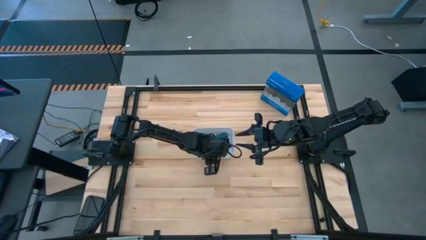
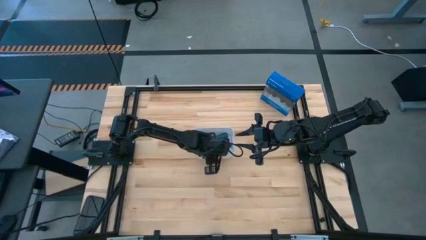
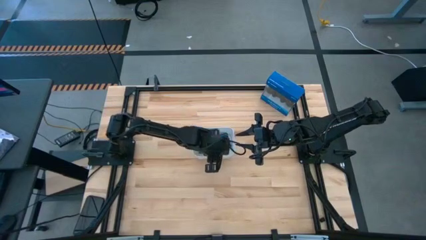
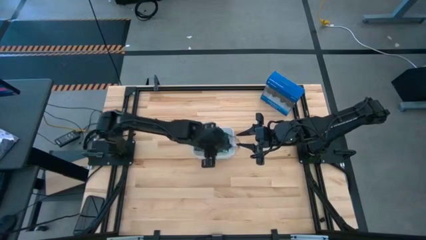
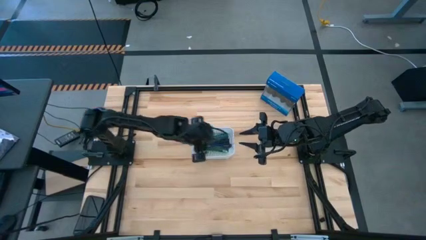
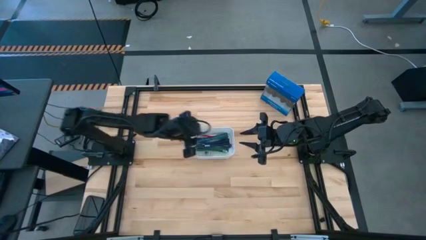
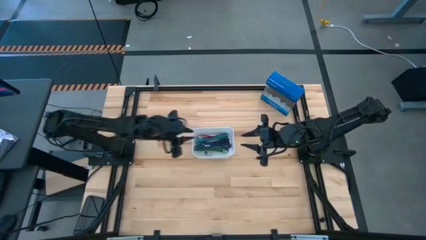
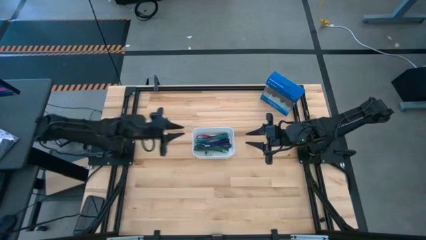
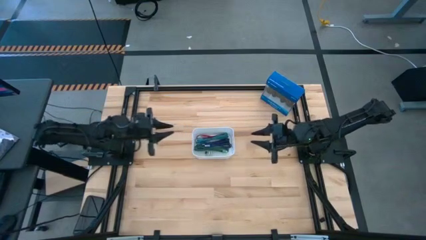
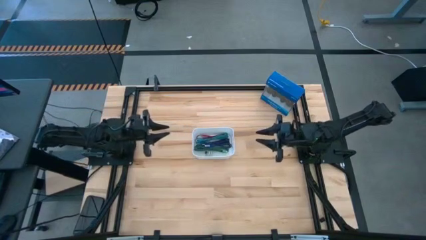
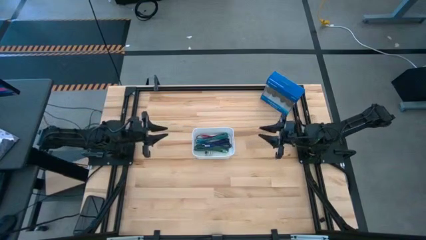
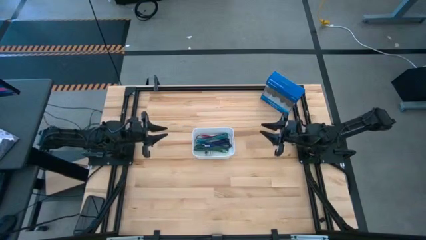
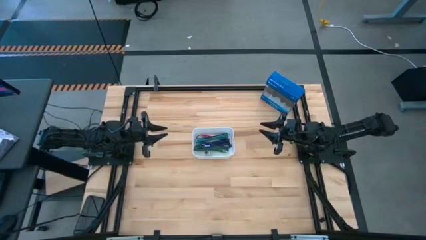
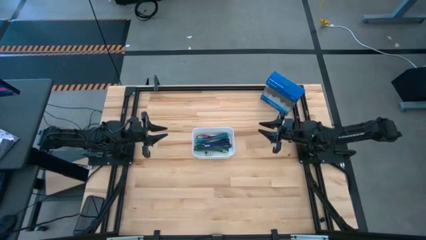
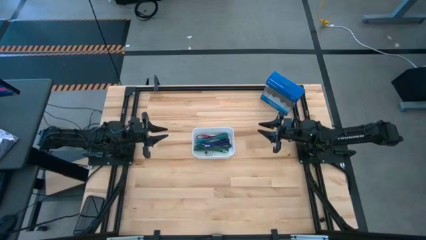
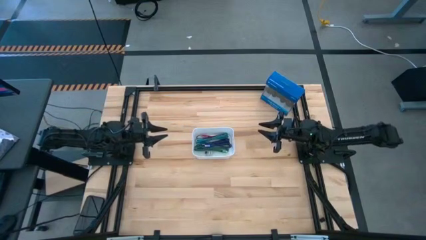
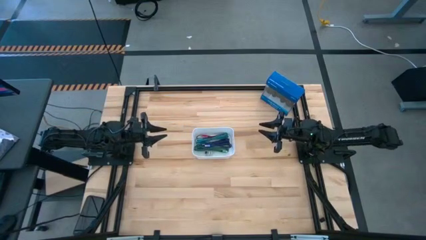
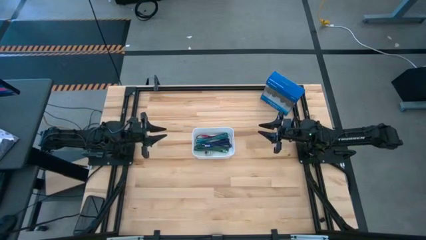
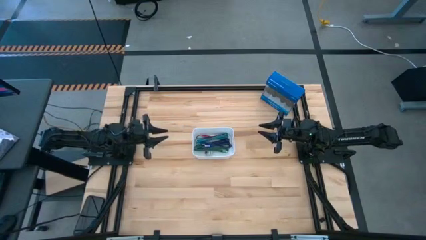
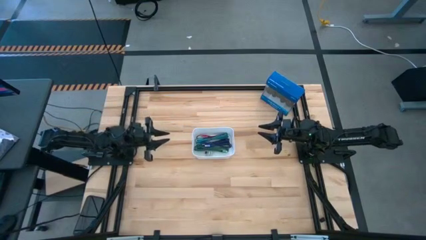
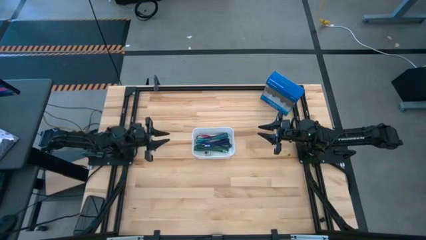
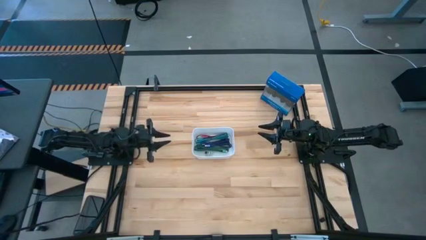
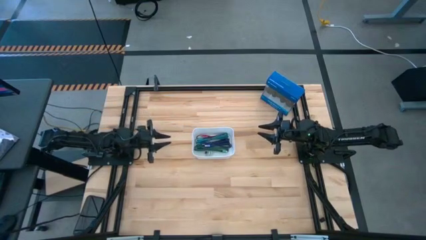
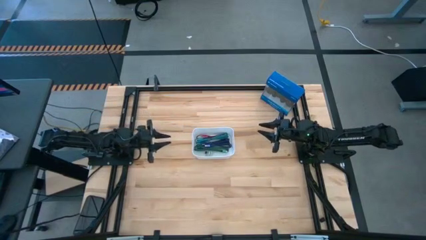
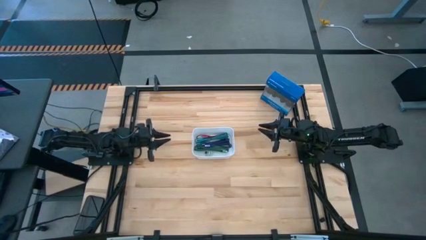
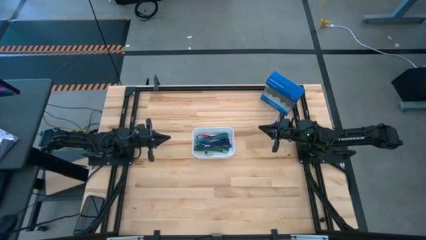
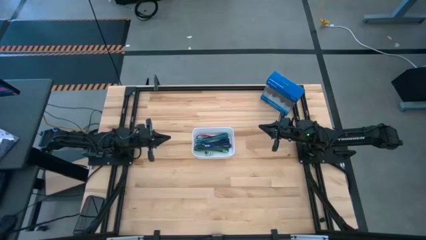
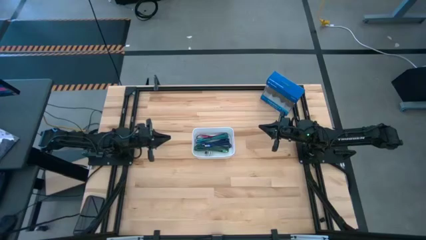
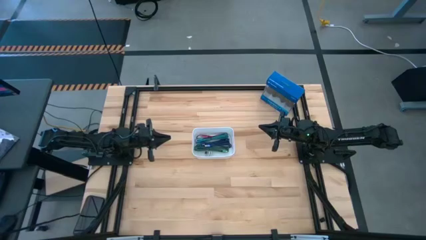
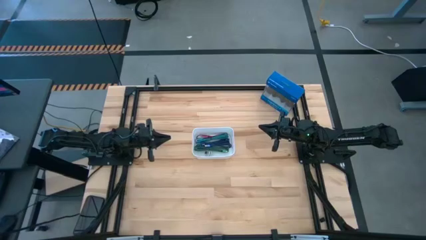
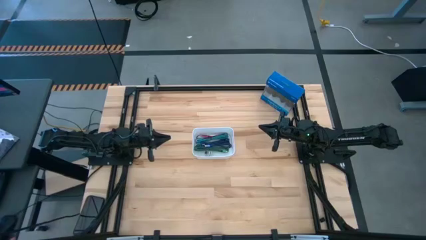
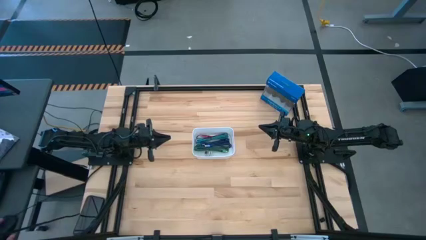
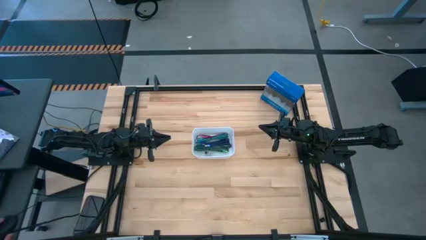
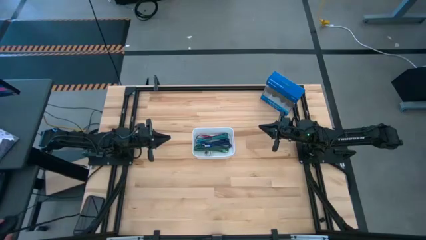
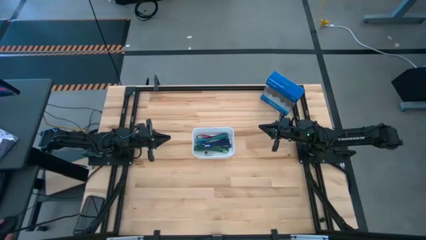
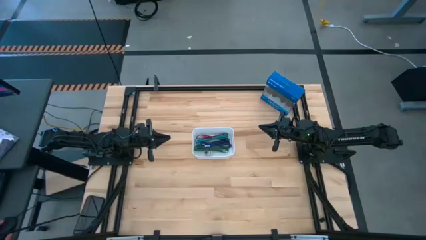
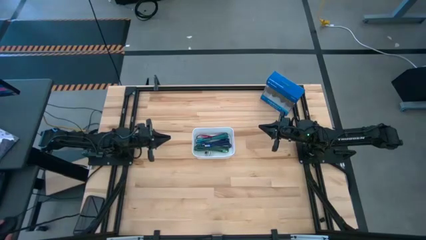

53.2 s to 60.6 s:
Task: Pick and place USB-C Cables
Return to Home Position

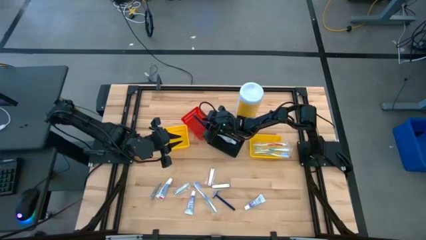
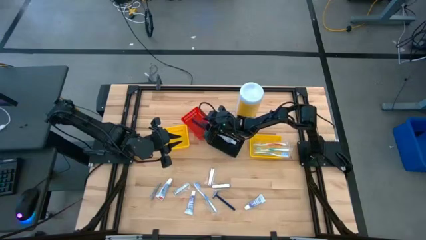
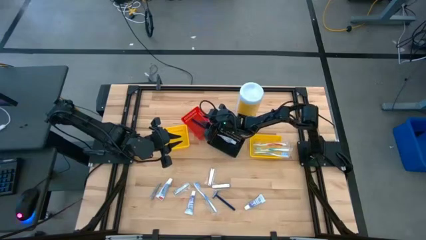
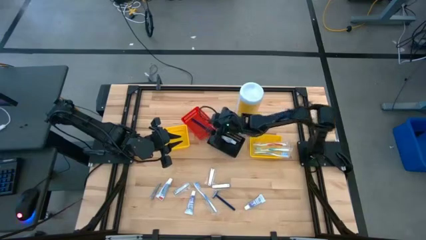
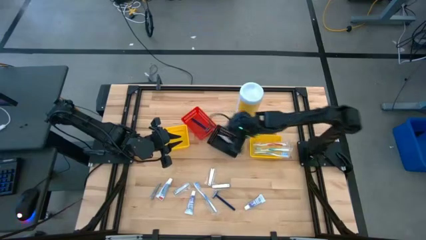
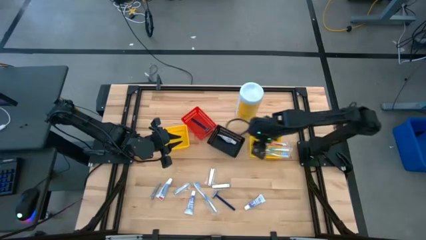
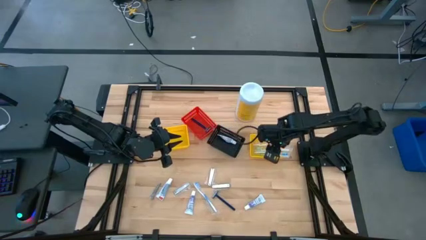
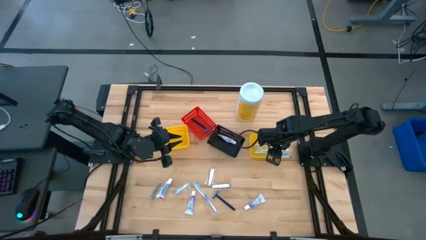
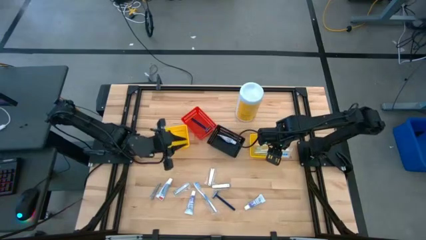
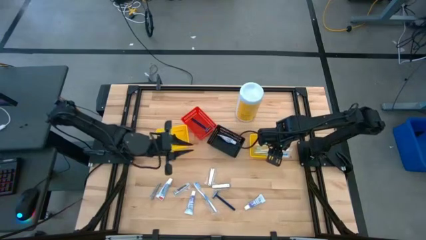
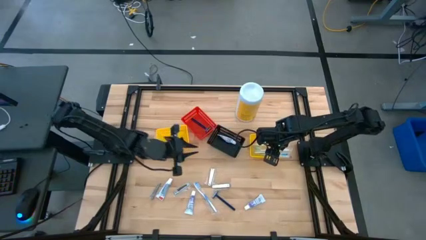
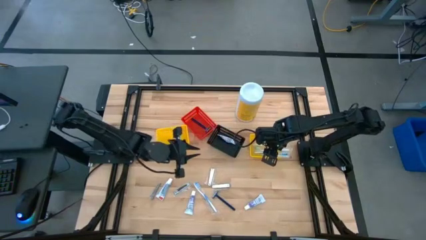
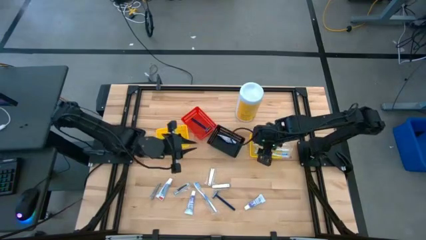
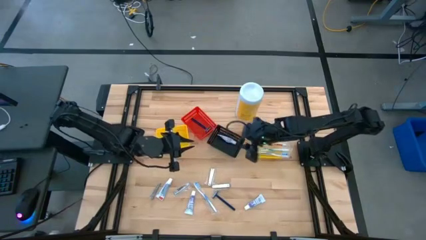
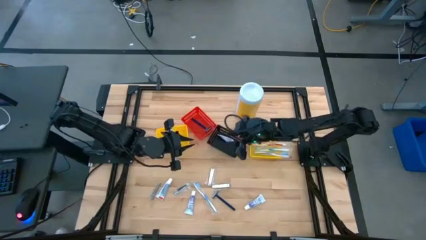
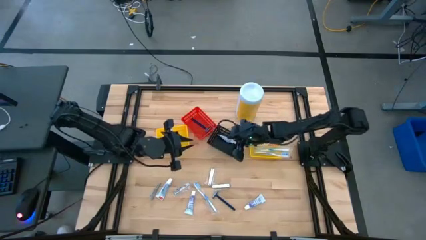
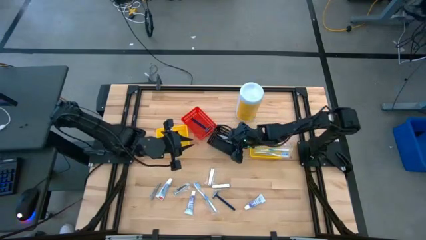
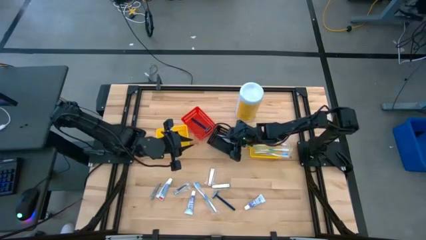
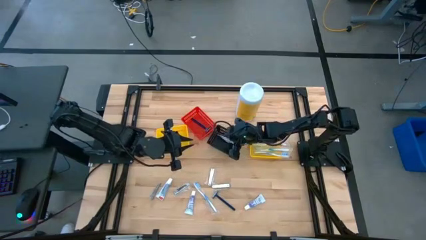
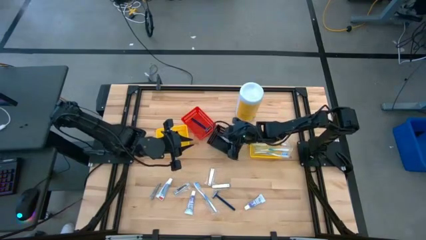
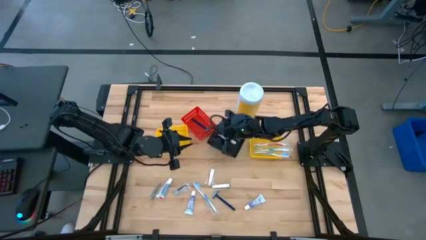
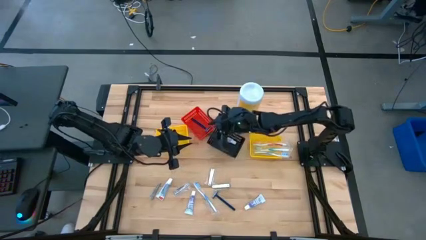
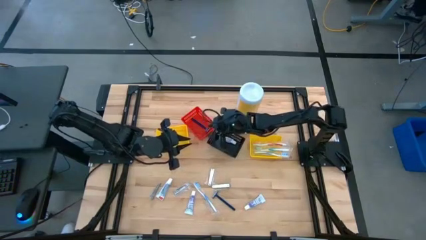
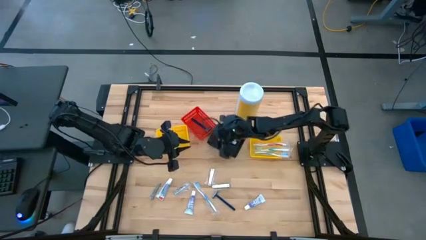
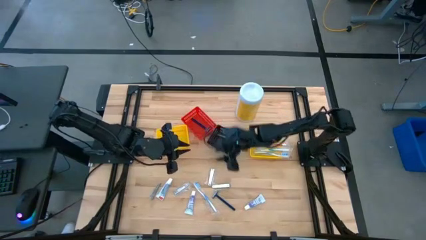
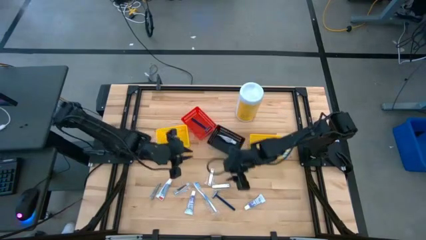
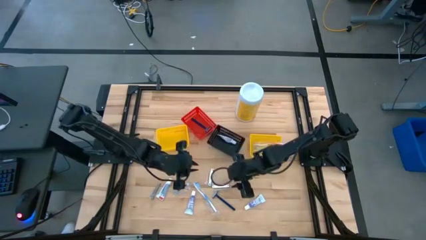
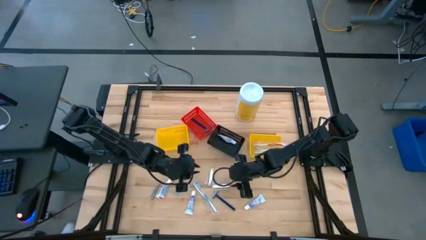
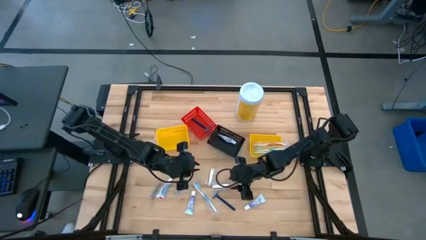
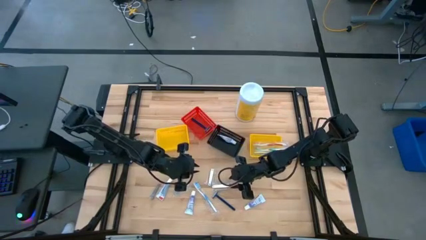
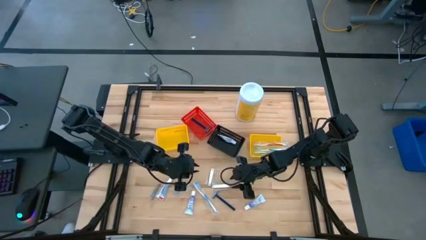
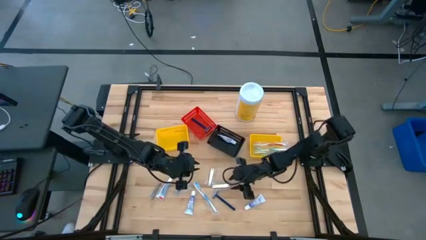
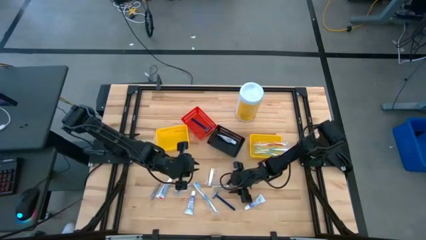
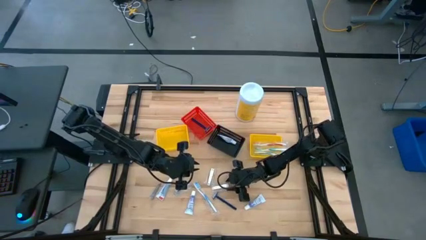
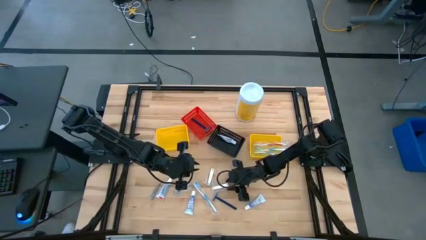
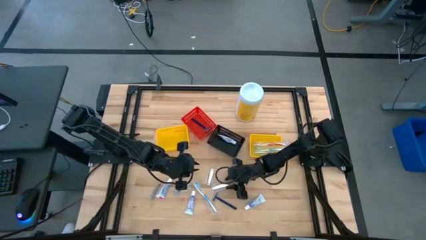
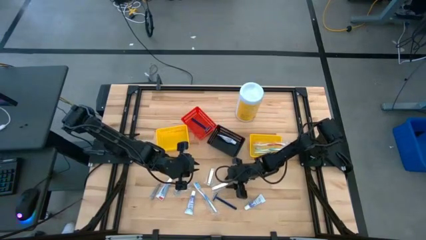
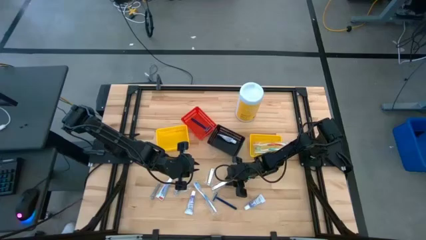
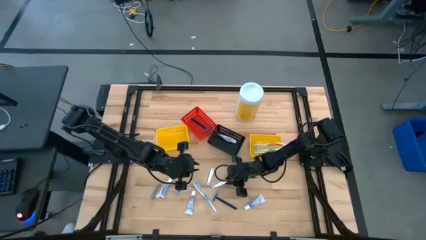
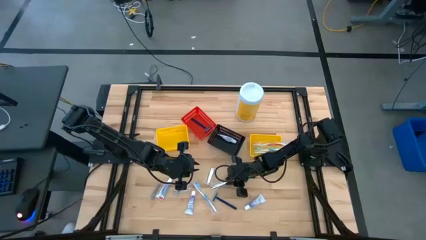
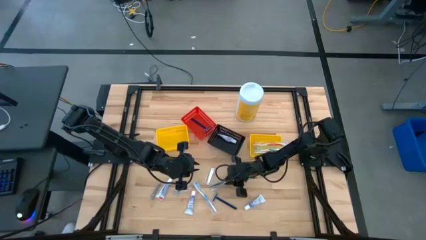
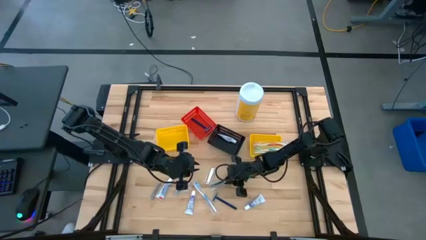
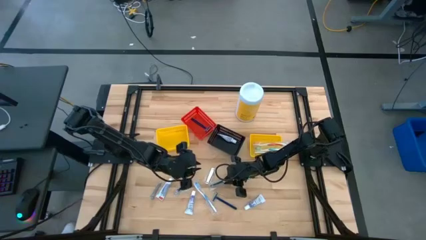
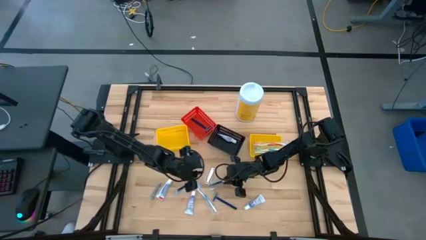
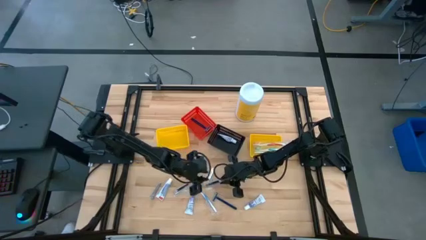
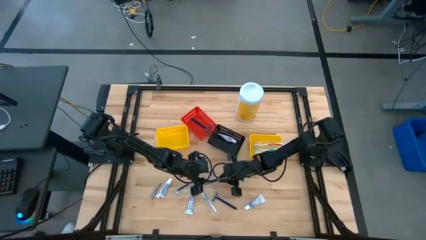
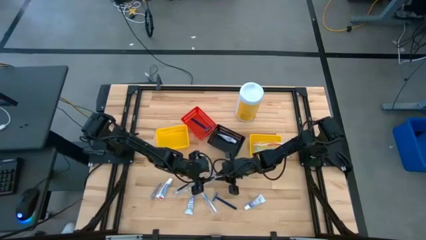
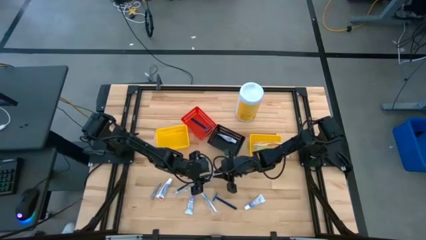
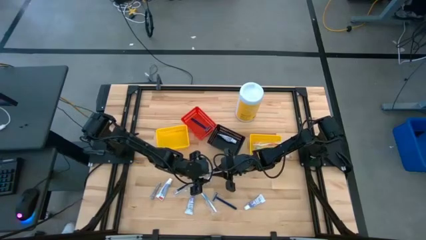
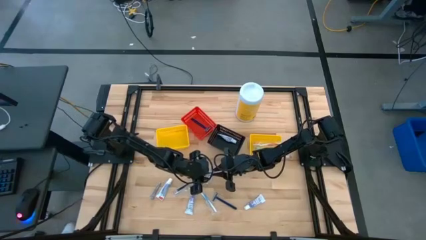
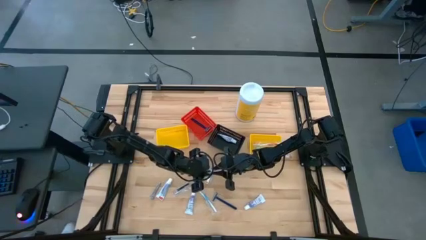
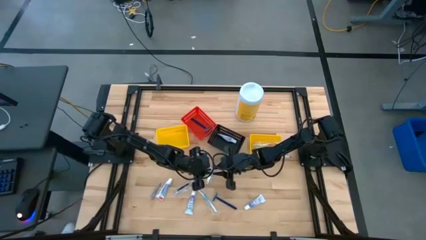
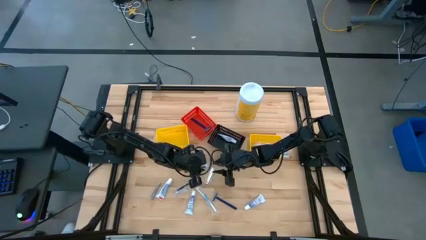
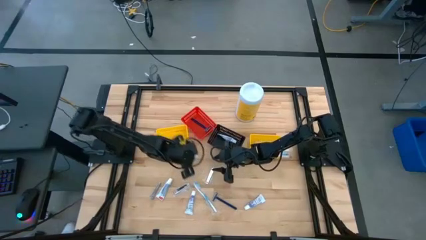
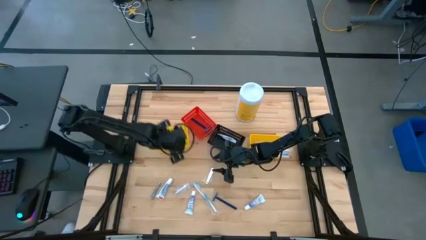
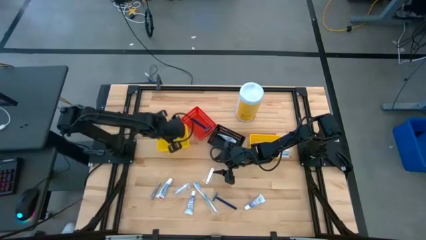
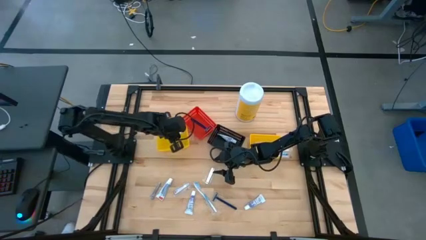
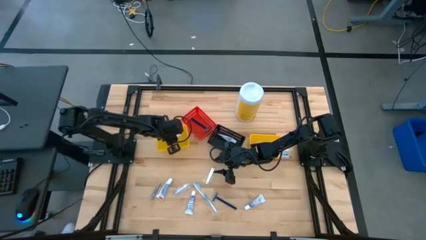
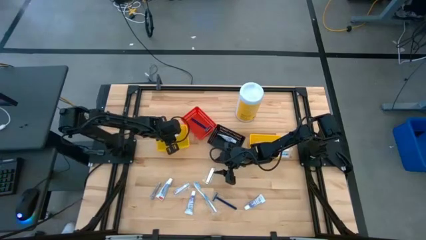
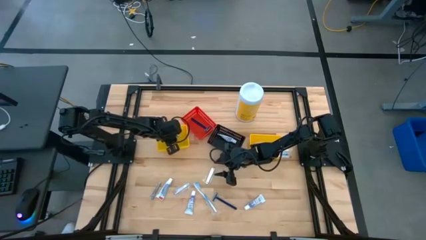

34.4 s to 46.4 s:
Task: Pick & Place Travel size toiletries
Put the nail cutter into the left yellow bin
